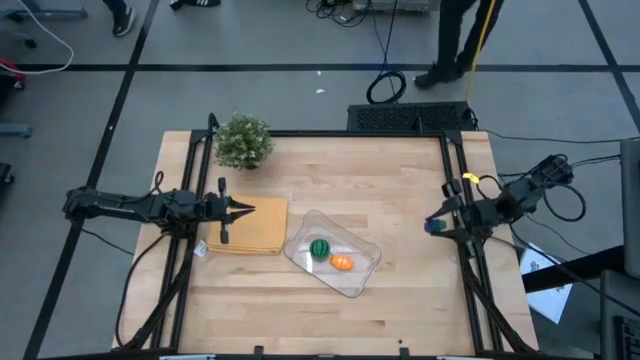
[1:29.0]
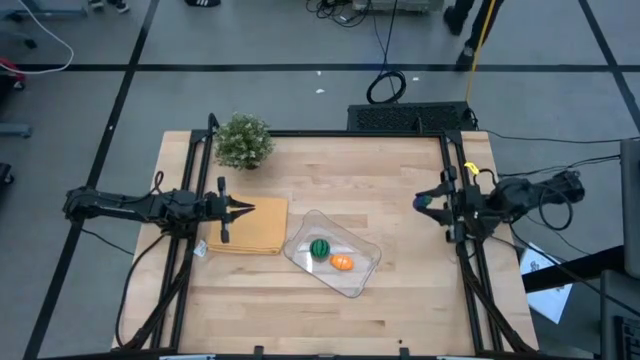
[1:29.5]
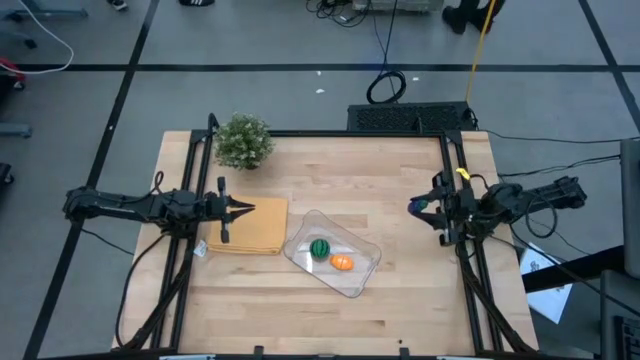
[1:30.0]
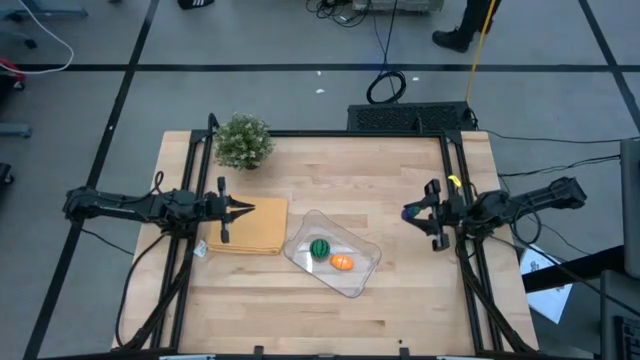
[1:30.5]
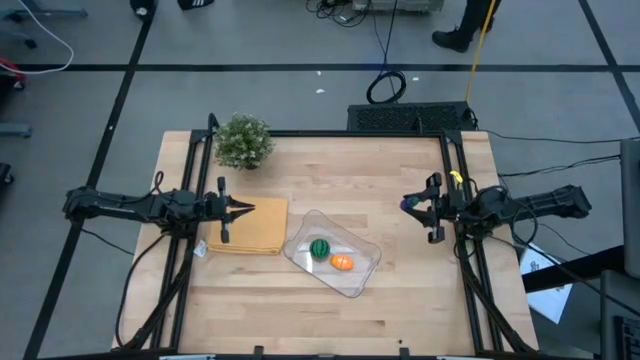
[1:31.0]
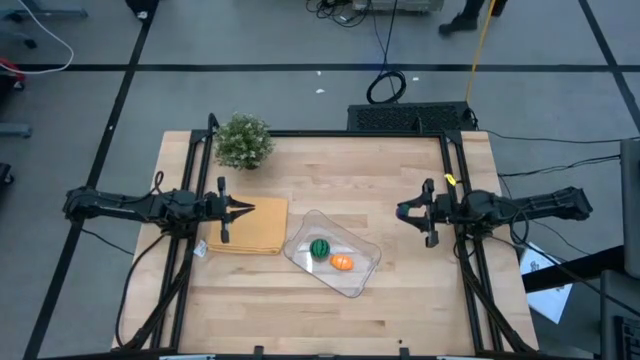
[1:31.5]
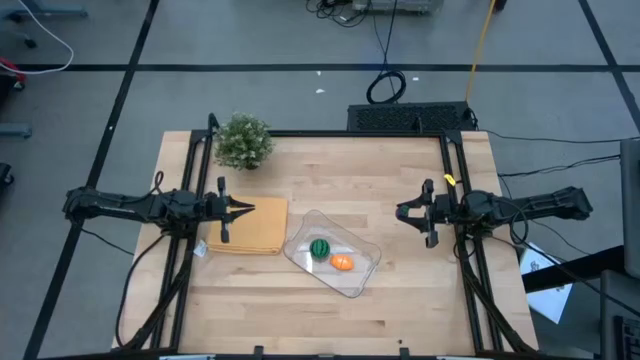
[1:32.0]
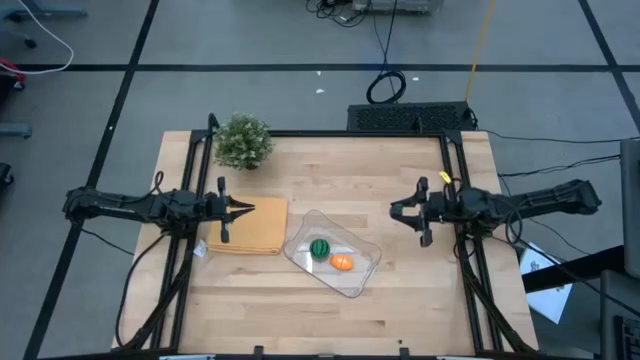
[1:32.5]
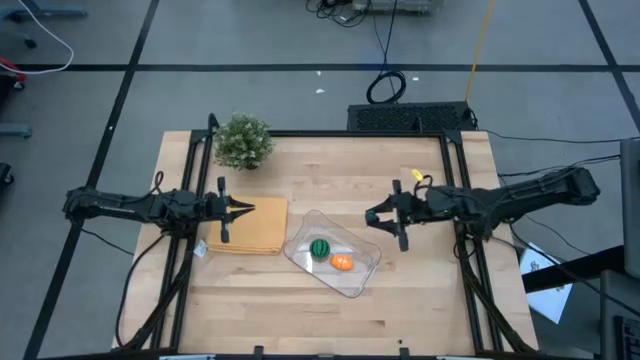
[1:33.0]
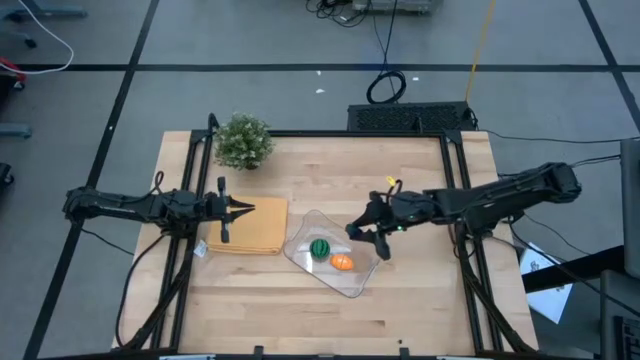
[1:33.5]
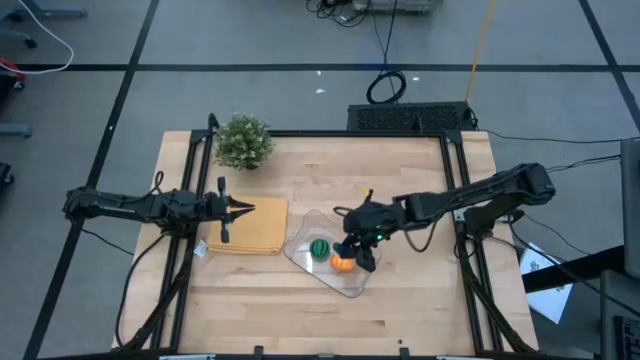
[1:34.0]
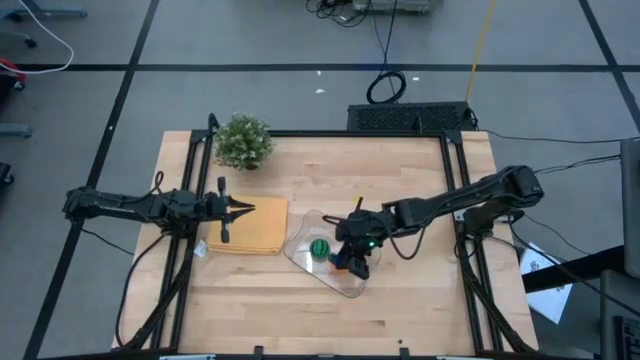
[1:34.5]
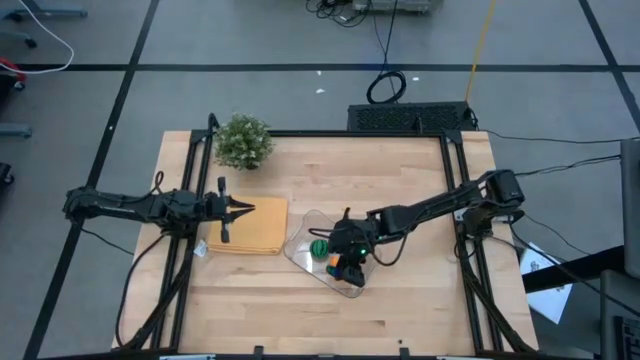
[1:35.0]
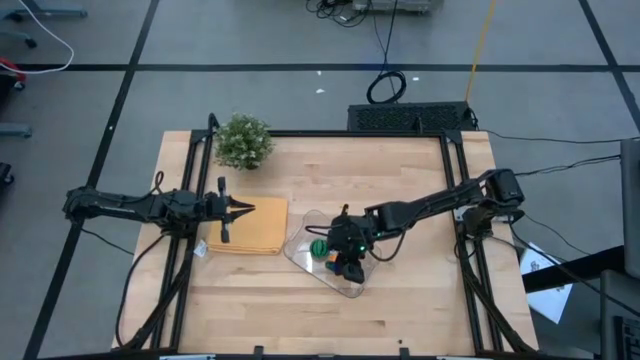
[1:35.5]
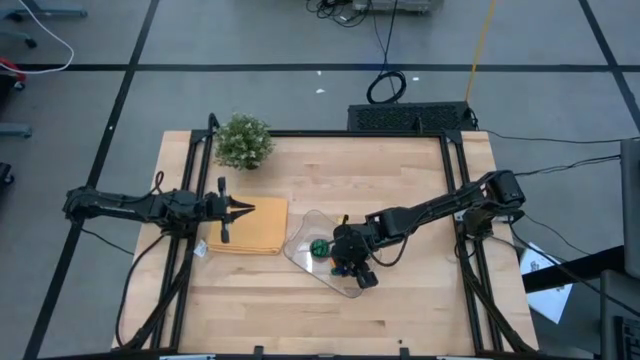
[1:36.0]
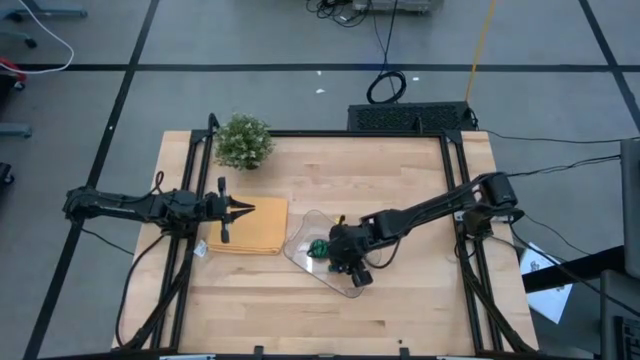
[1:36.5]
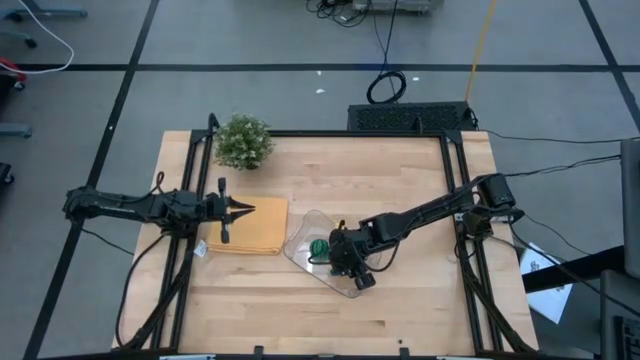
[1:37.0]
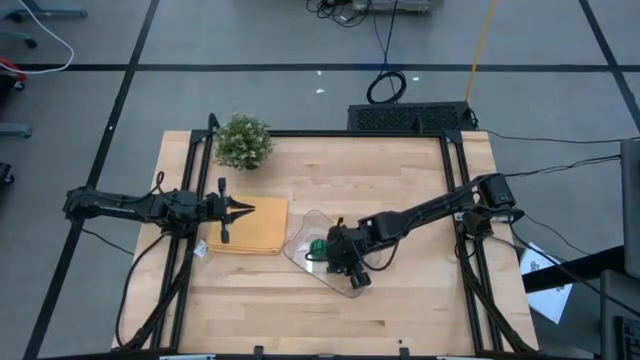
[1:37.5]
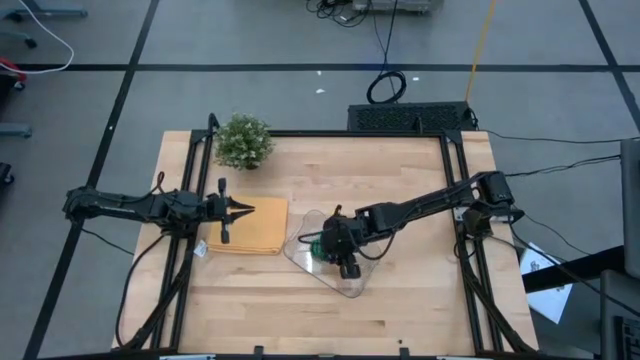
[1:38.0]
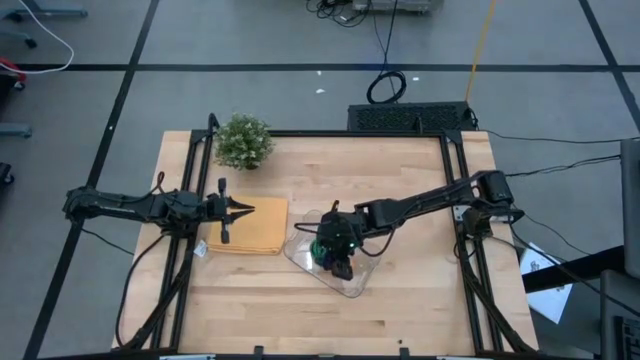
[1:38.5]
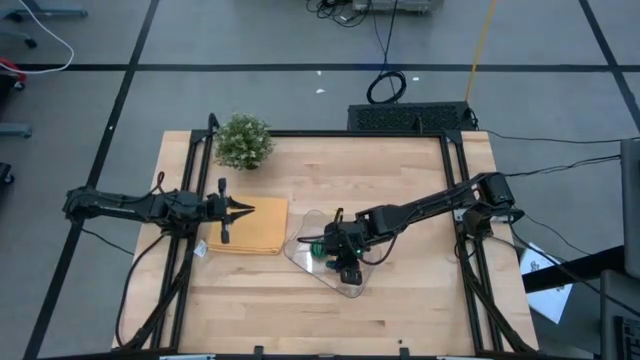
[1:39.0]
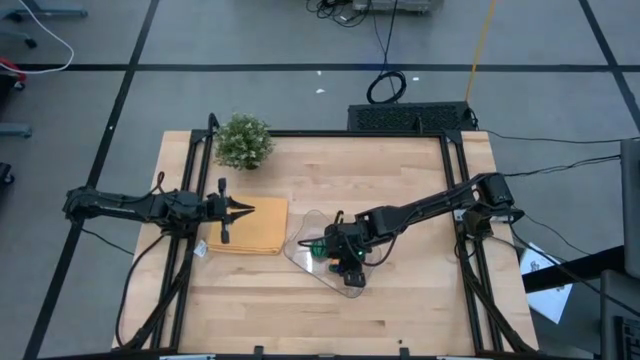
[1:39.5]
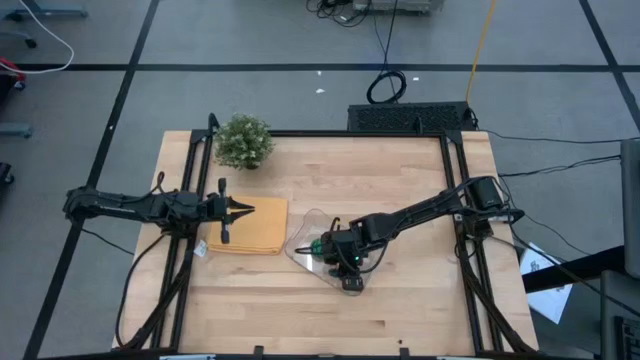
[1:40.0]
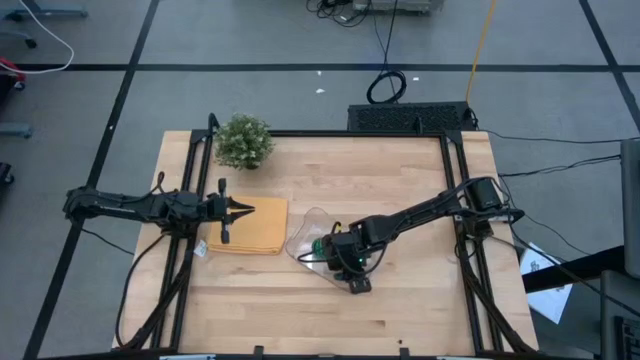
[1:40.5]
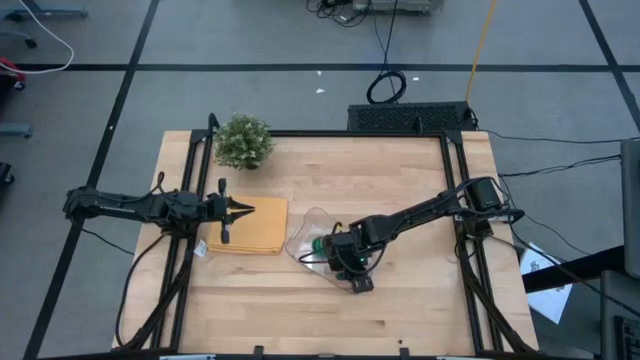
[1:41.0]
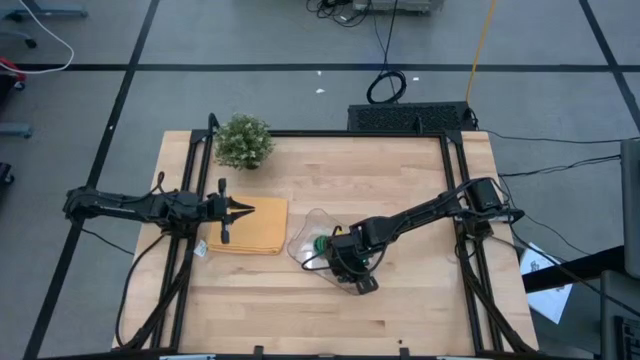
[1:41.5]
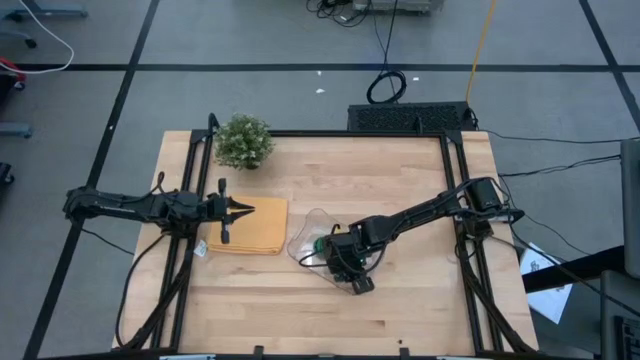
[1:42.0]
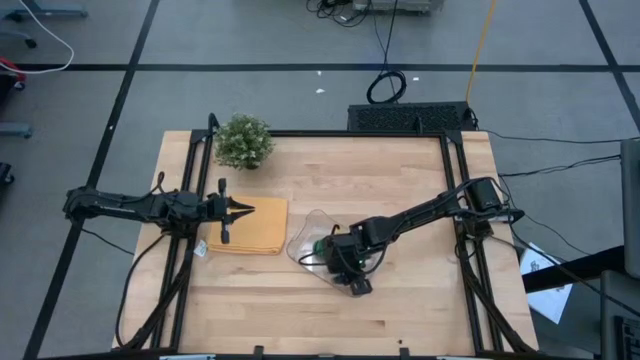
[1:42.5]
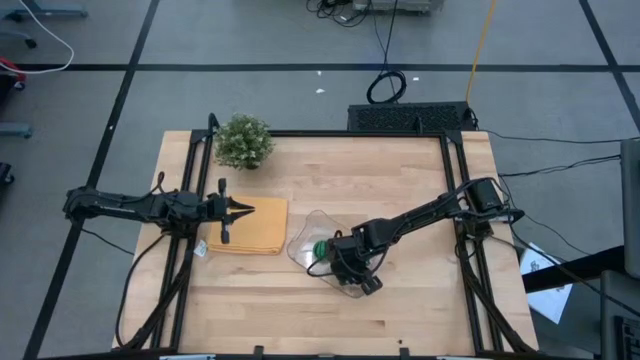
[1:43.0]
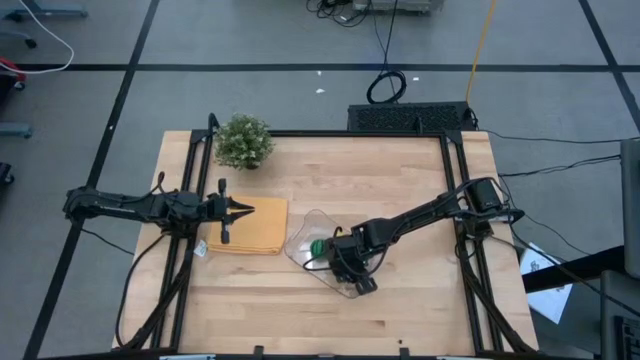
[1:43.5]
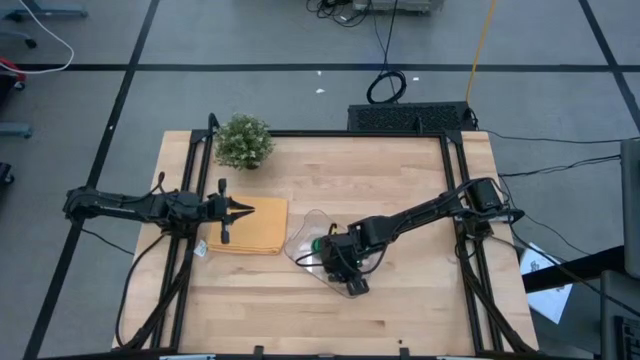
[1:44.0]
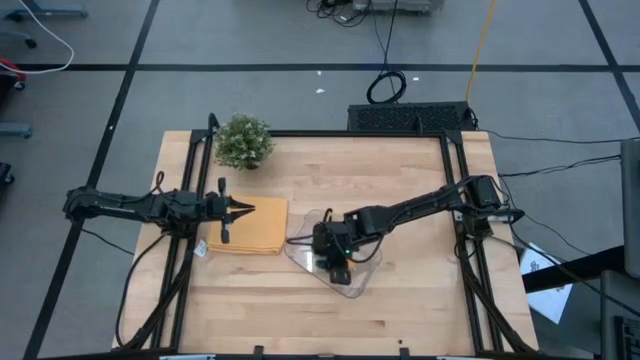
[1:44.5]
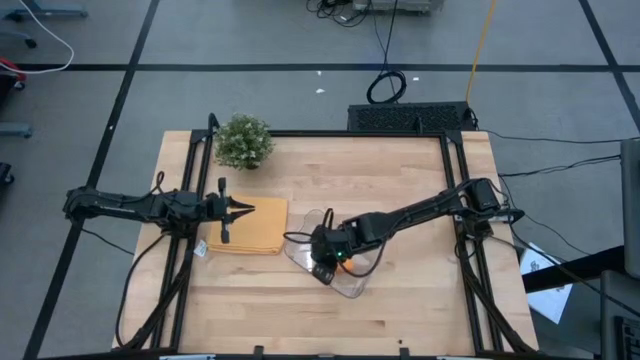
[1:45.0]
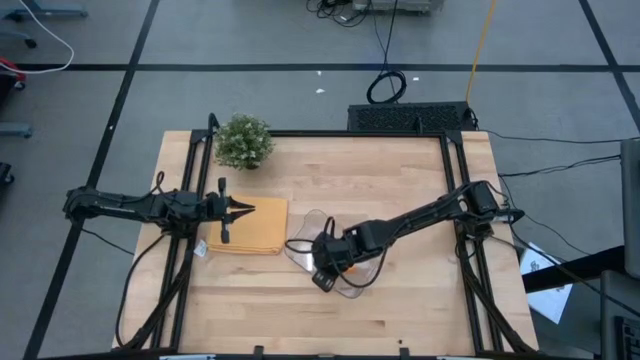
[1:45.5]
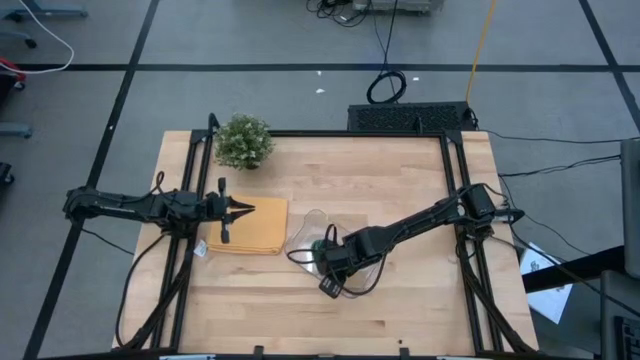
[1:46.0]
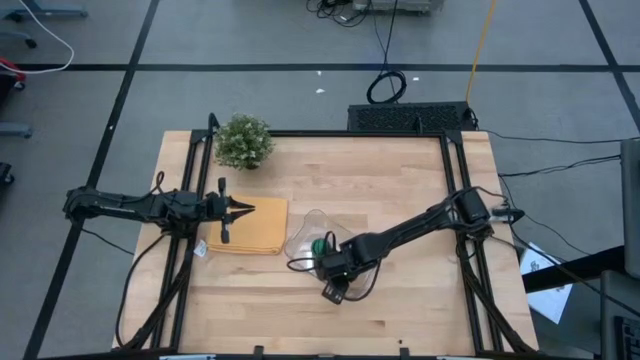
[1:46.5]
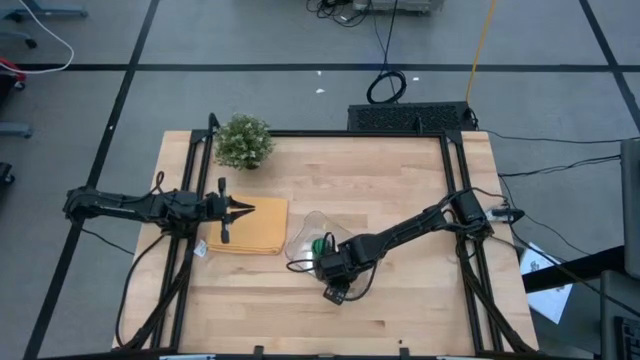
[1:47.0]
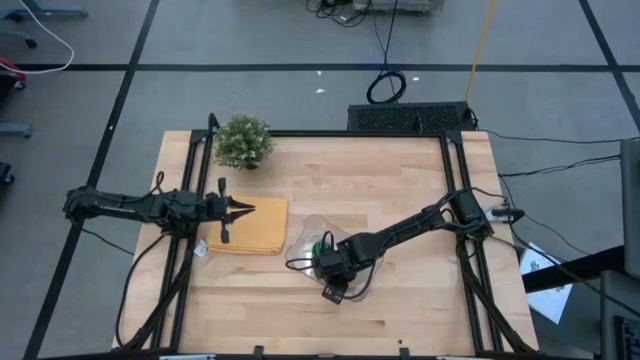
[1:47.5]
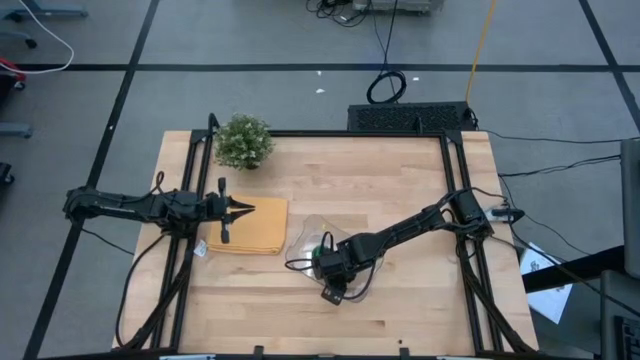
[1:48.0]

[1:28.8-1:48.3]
Task: Pick and placing Produce into tupperware
Put the purple eggplant into the transparent bin

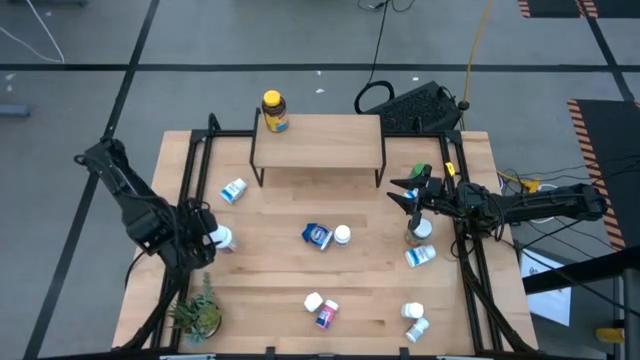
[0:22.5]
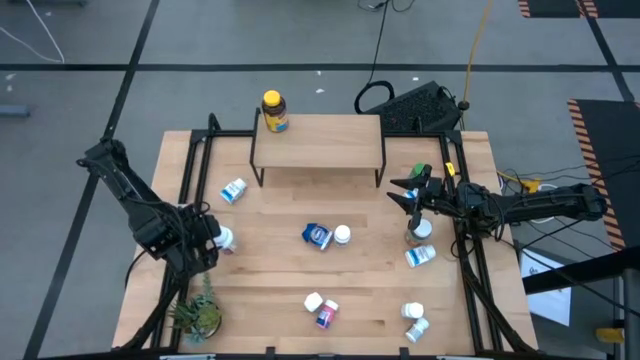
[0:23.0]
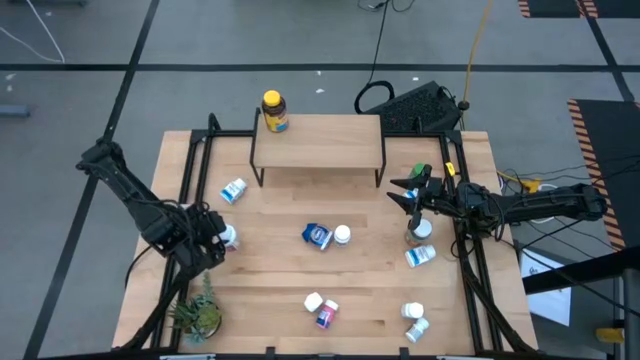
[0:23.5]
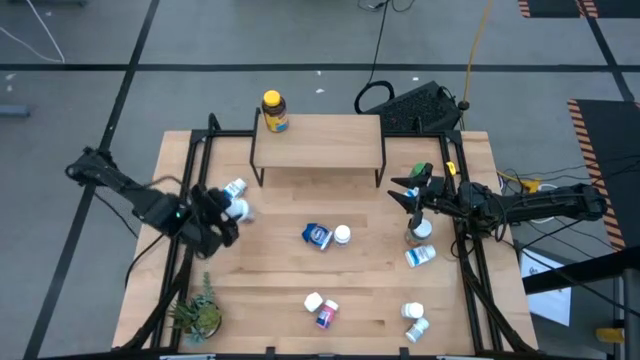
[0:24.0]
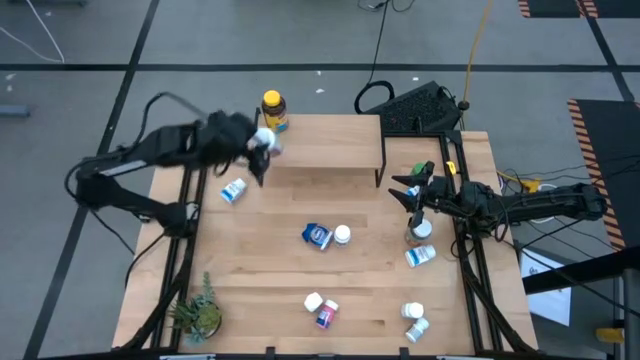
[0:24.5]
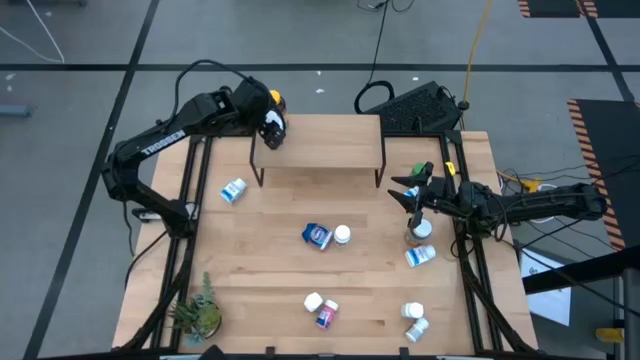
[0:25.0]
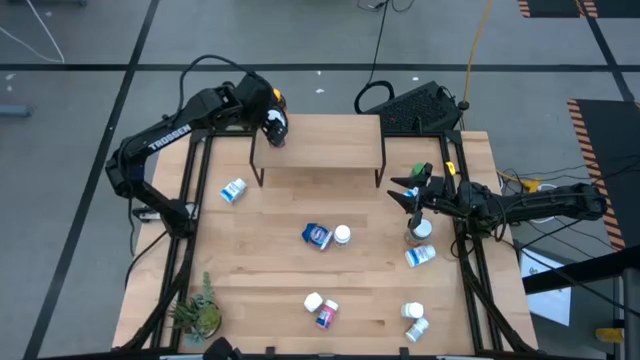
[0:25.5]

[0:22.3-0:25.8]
Task: Pick and place medicine bottles onto shelf by color
Put the white purple medicine bottle on the shelf
